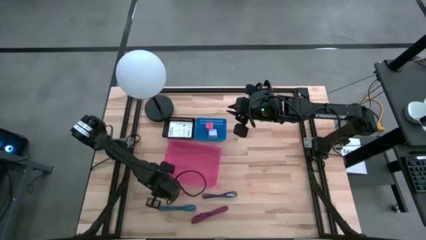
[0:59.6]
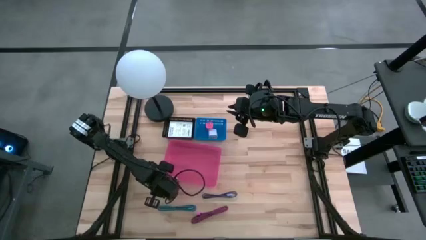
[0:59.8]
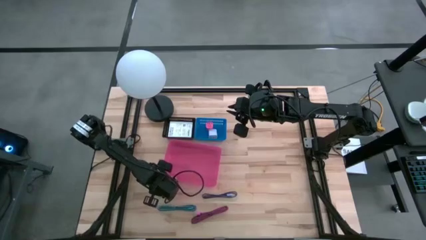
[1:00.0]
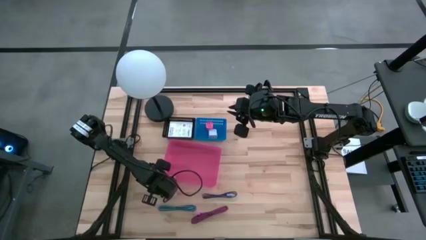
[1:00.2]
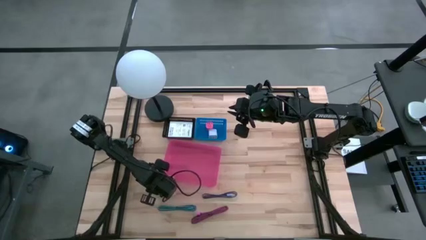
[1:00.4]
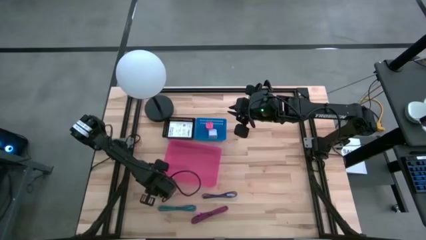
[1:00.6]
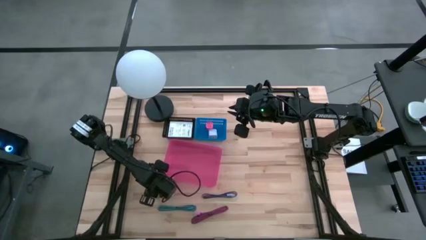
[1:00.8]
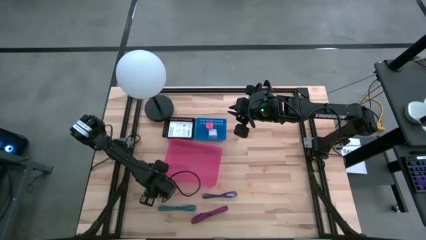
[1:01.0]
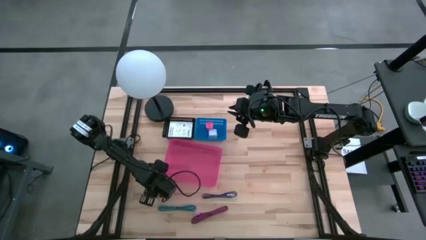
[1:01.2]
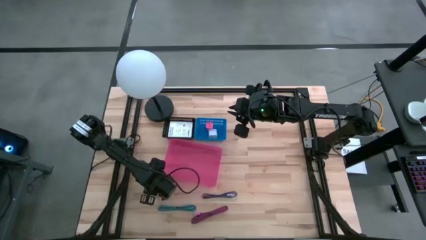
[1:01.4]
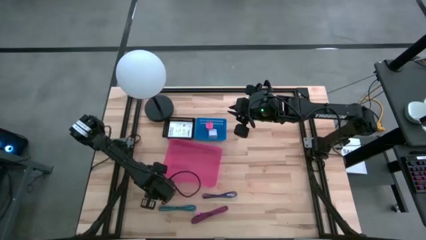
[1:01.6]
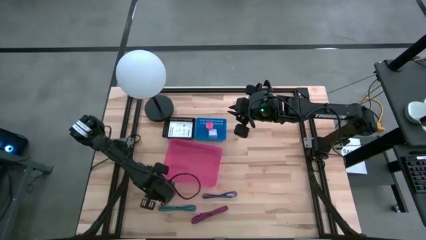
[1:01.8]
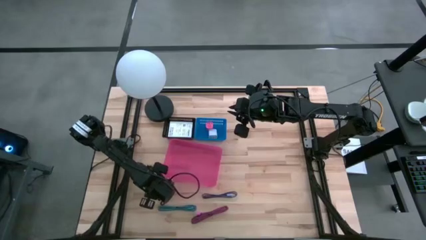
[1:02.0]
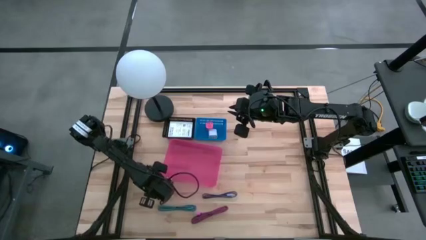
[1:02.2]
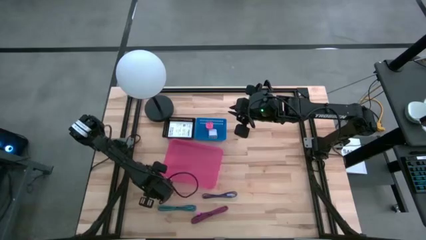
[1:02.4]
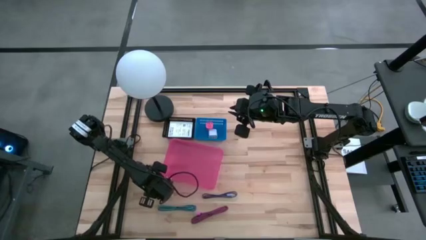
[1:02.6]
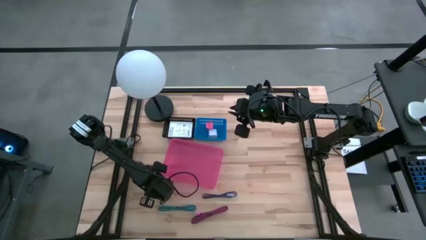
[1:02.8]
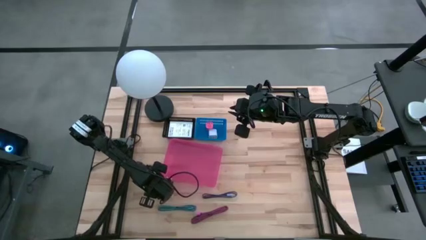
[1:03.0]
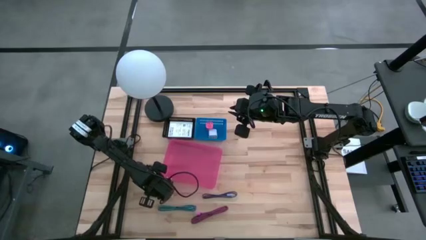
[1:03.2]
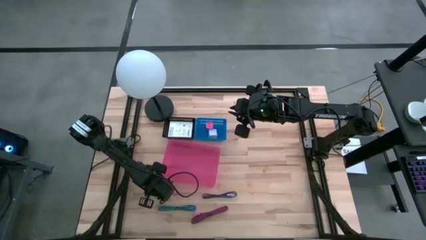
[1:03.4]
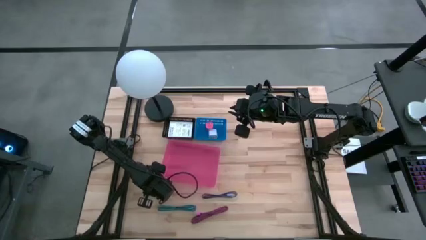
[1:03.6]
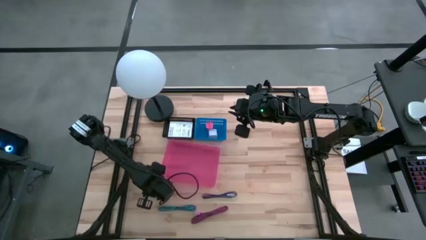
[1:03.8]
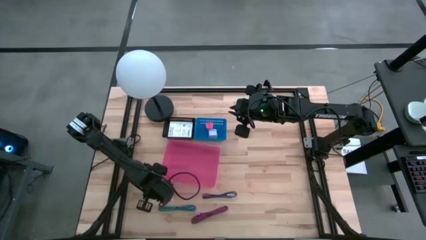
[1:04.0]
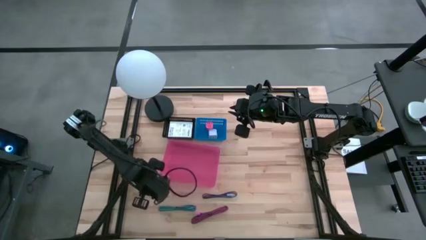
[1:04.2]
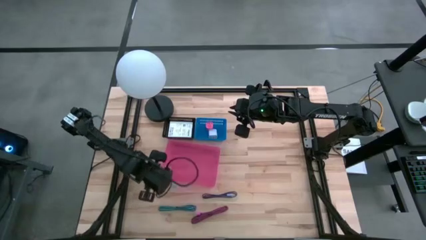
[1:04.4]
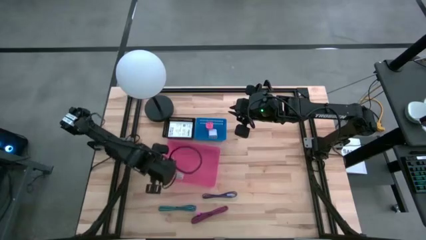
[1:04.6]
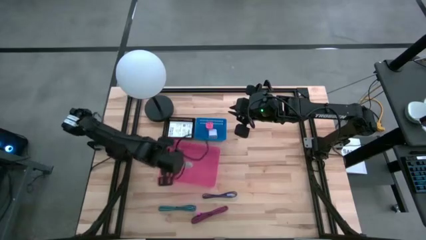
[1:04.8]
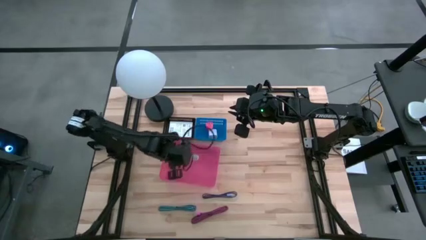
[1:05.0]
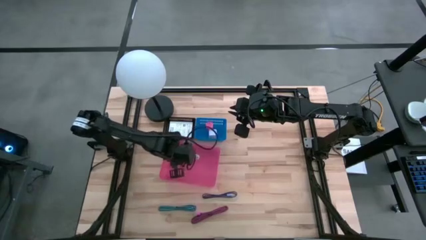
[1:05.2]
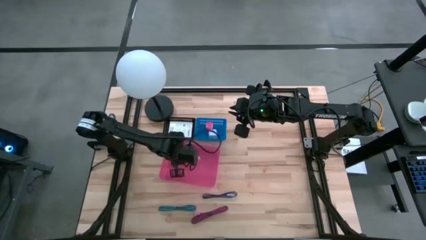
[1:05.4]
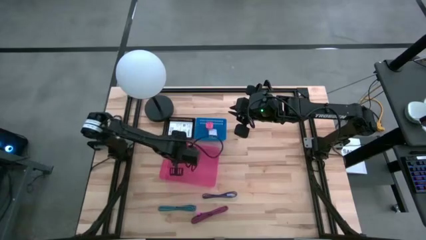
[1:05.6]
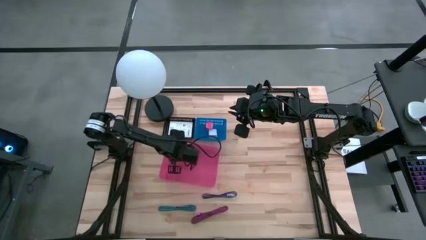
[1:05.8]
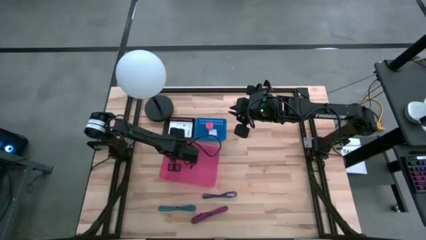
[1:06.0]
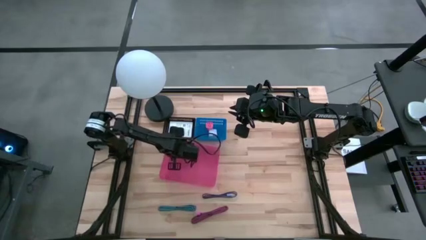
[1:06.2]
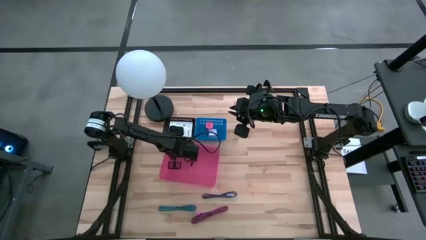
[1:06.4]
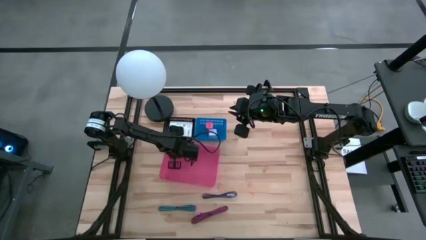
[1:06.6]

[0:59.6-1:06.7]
Task: Pick and place items into bin
Put the white charger cable into the pink bin

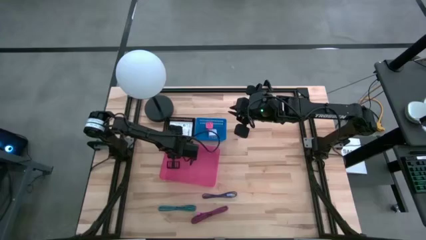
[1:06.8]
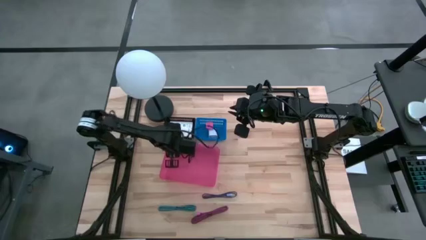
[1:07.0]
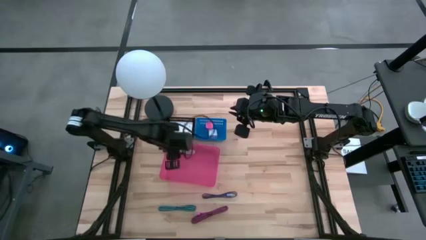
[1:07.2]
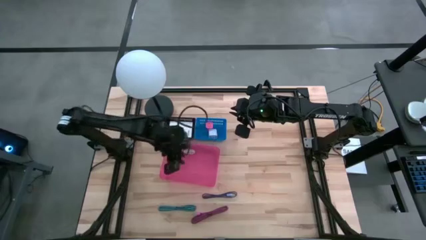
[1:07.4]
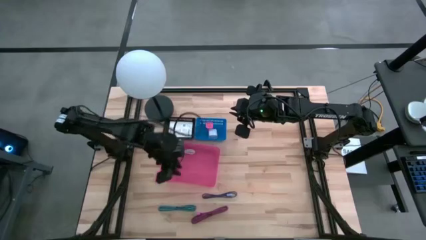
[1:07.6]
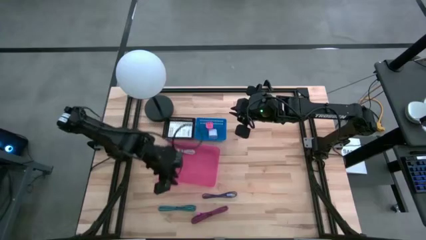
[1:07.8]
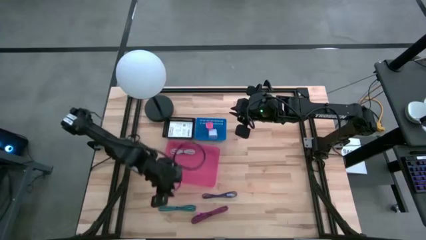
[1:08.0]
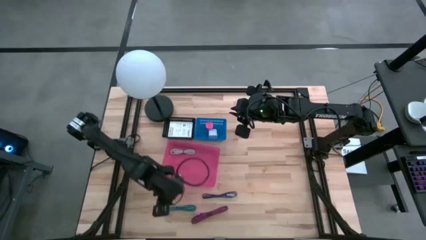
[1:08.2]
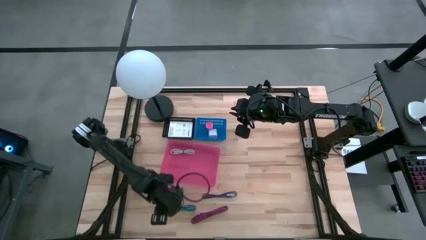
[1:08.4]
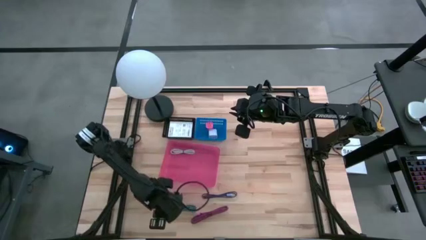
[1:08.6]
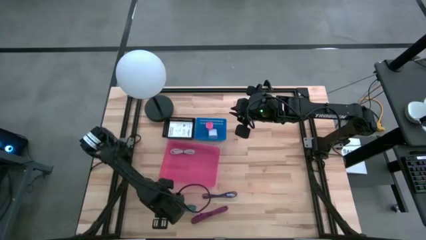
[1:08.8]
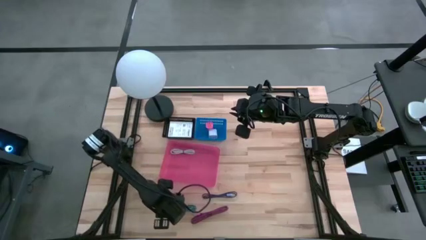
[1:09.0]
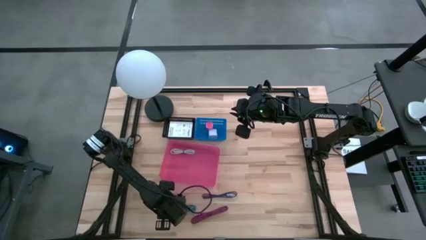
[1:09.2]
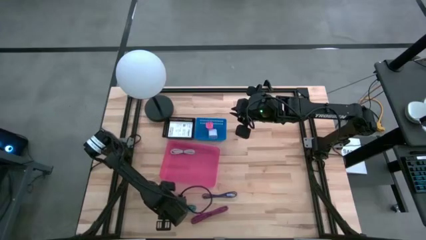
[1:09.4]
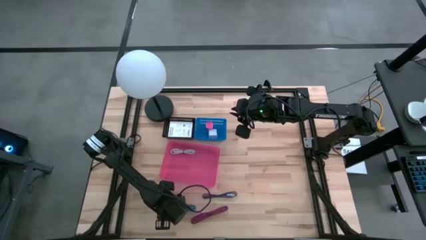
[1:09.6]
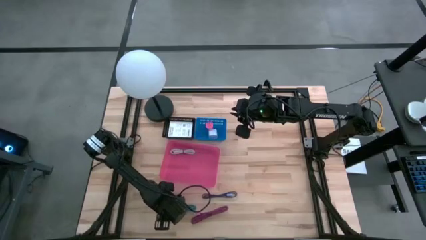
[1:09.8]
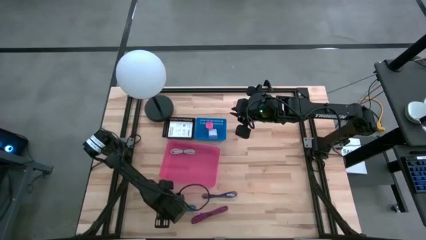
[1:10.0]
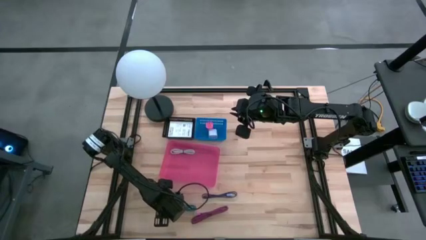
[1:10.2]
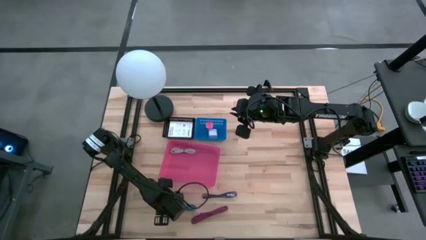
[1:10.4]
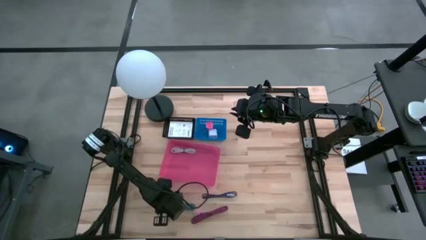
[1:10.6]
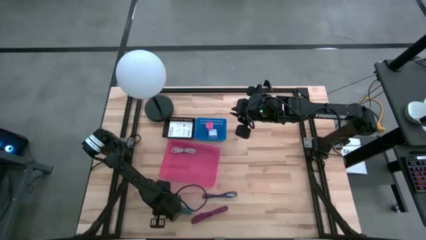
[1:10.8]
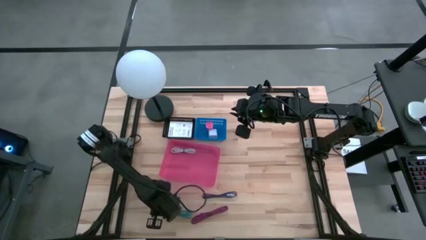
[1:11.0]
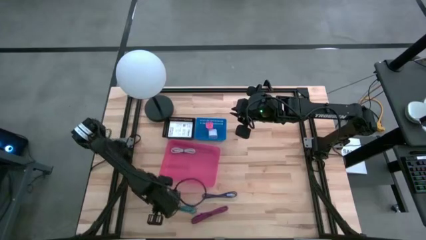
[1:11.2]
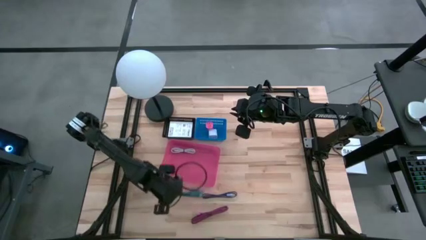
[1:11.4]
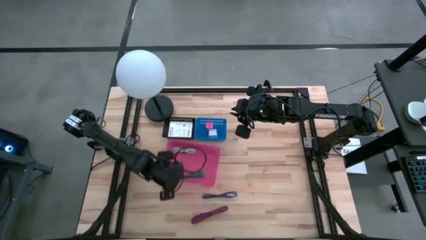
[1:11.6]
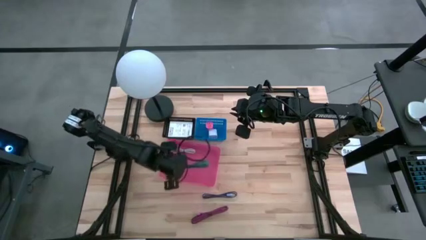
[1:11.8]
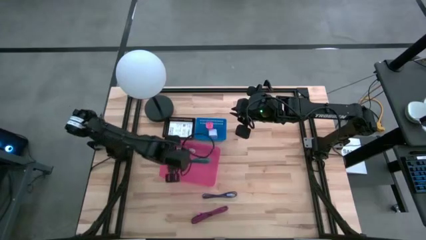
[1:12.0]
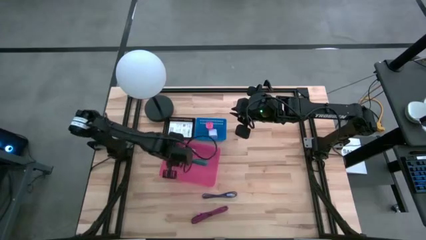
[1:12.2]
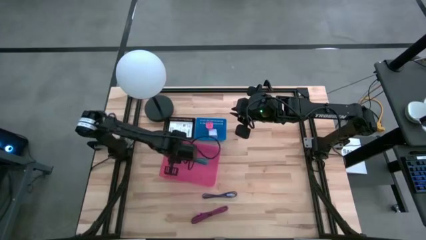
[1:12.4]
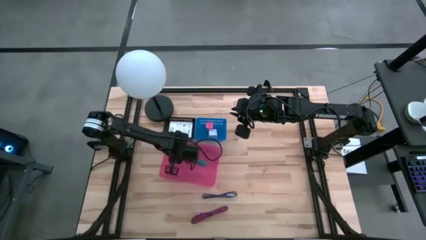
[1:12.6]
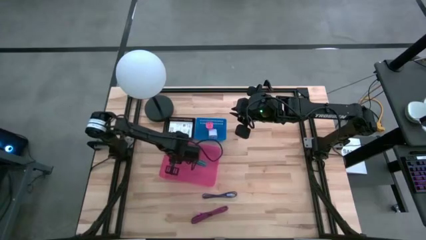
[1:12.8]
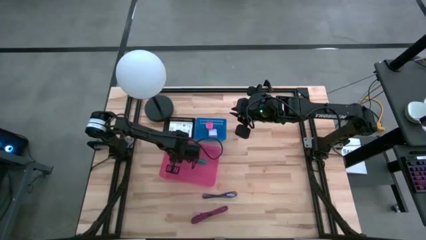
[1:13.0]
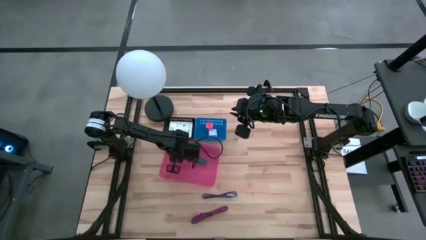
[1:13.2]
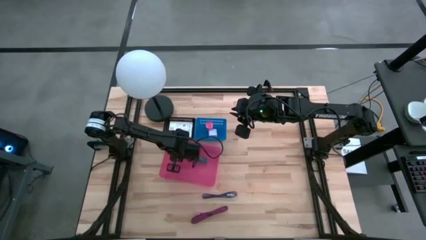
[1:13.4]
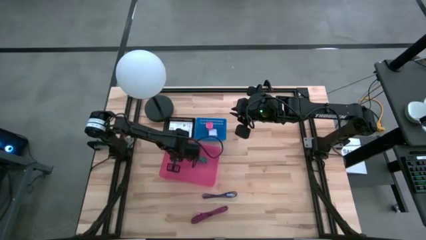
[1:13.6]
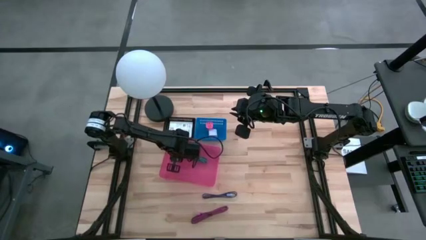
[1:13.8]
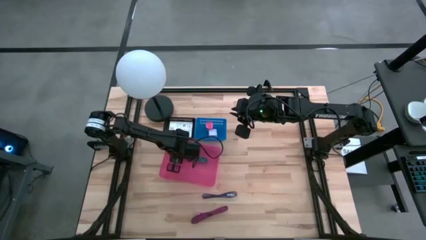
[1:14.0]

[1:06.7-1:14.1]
Put the black blue charger cable into the pink bin

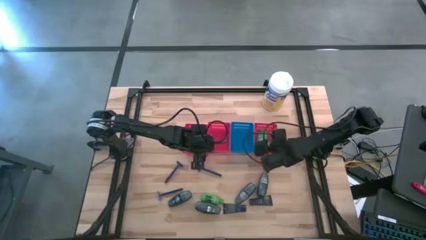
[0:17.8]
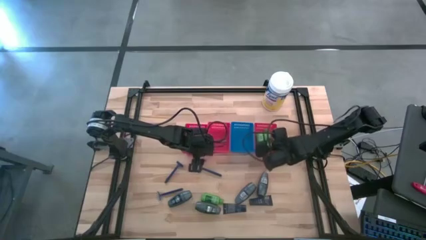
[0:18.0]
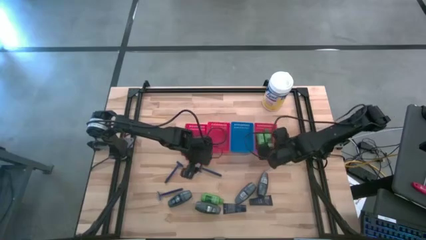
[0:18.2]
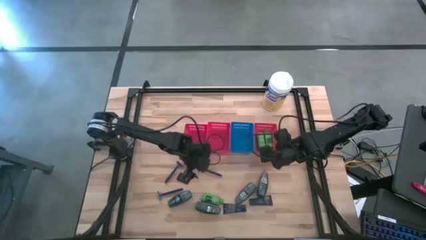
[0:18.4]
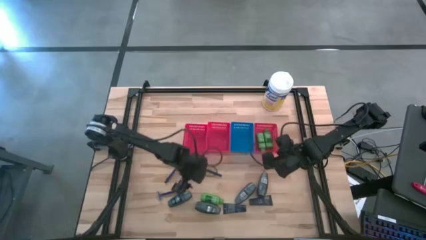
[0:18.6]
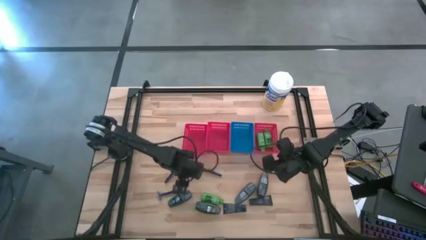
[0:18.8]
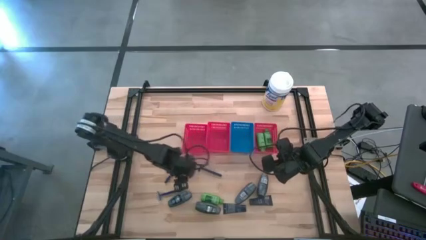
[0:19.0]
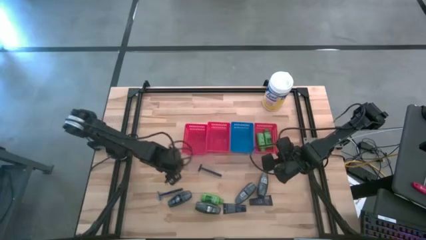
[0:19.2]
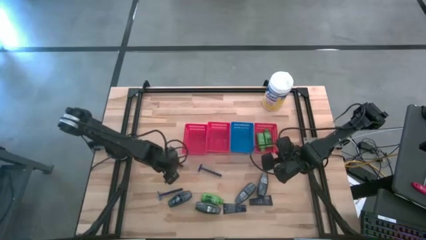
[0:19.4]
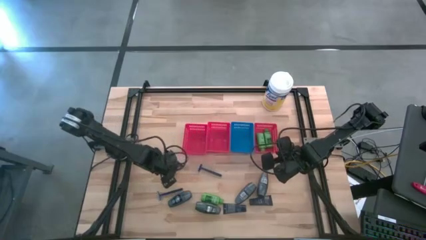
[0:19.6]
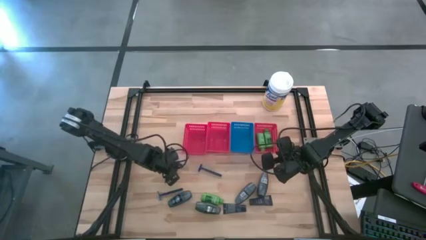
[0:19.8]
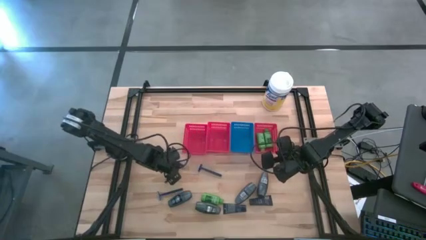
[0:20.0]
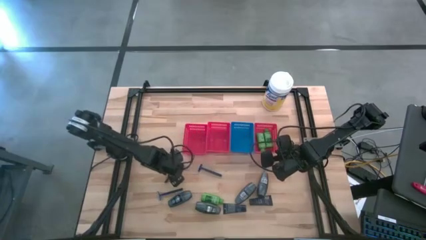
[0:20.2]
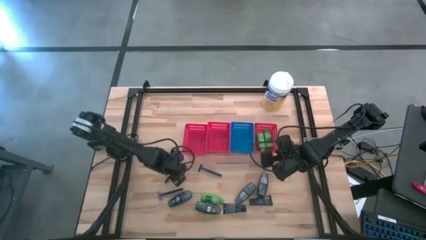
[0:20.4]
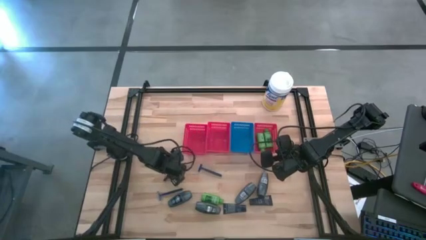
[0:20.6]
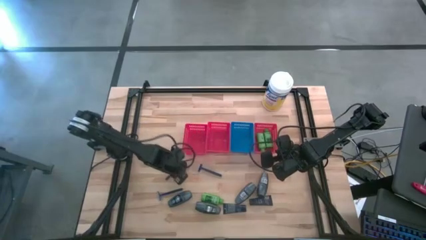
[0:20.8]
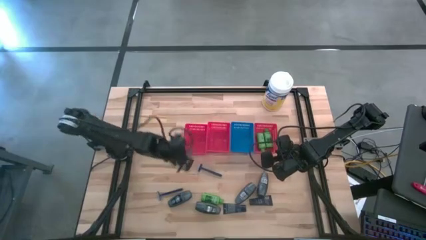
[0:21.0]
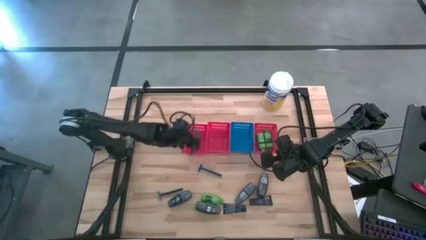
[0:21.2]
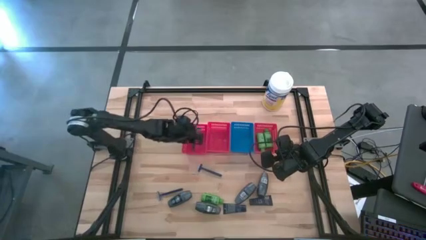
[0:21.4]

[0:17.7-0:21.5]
Task: Pick & Place Travel size toiletries
Put the blue razor into the left red bin
